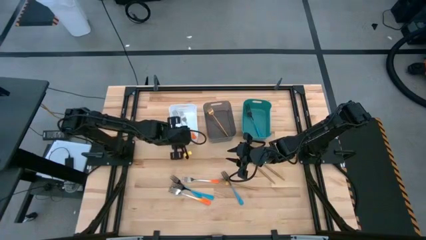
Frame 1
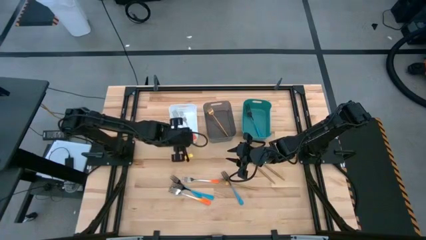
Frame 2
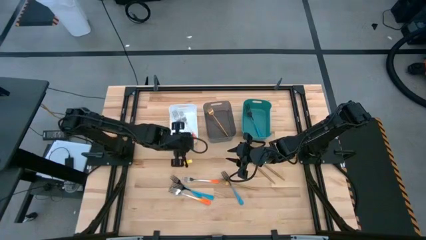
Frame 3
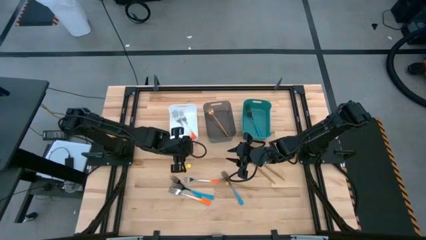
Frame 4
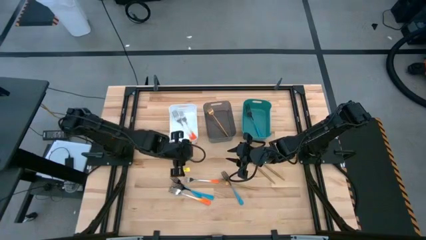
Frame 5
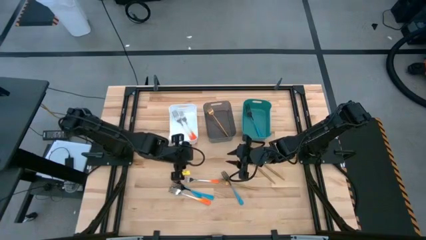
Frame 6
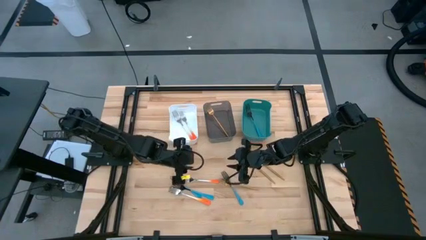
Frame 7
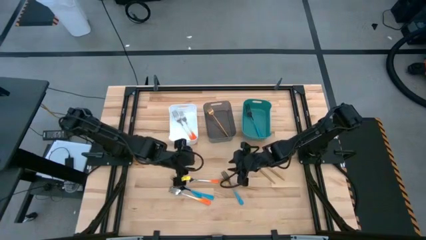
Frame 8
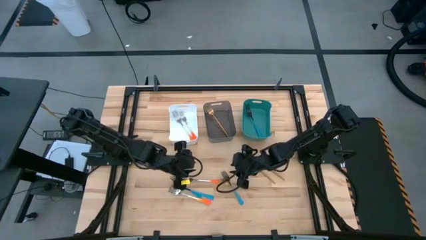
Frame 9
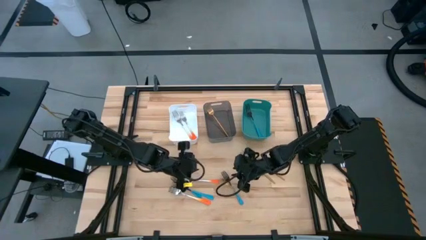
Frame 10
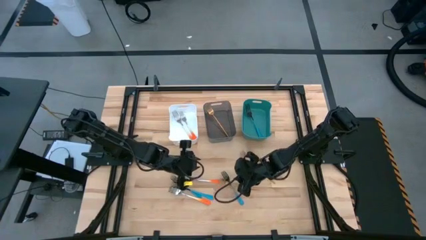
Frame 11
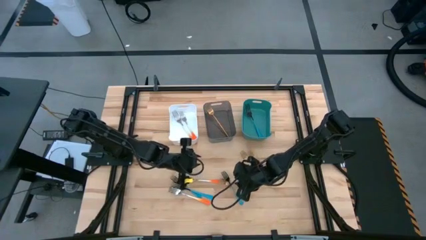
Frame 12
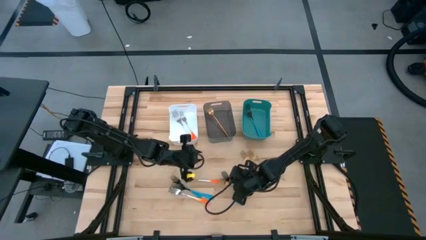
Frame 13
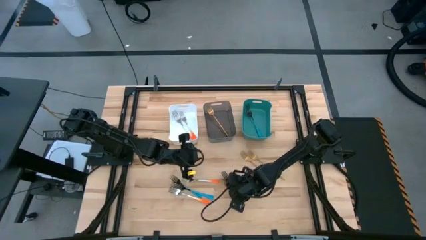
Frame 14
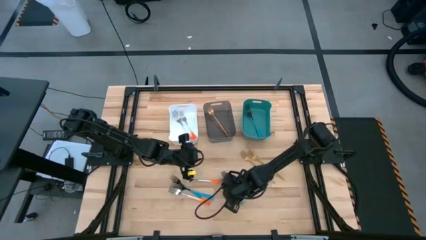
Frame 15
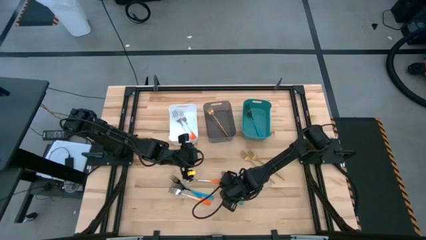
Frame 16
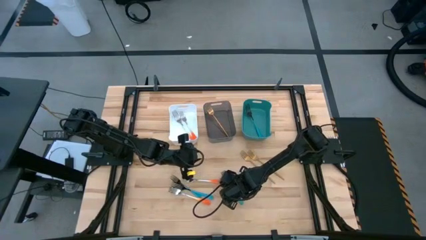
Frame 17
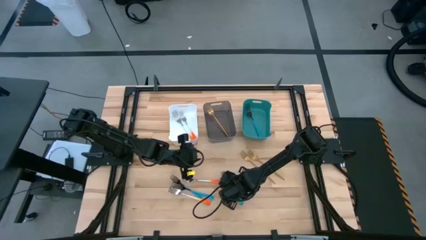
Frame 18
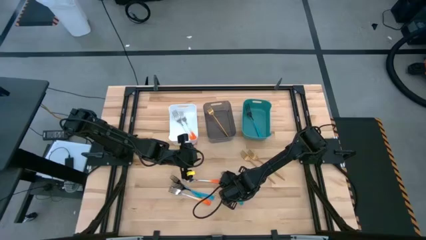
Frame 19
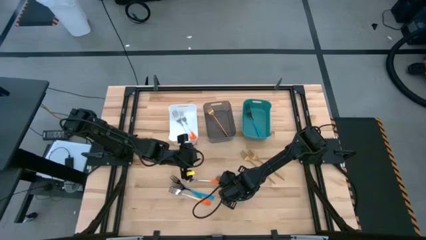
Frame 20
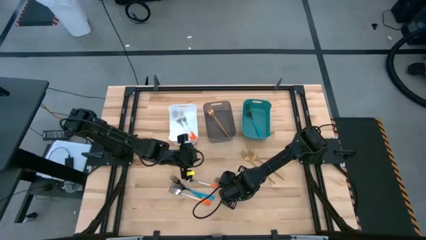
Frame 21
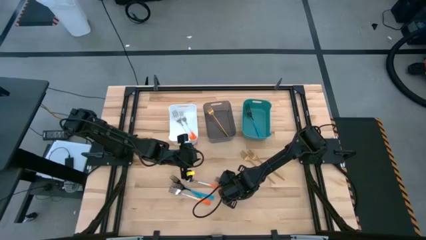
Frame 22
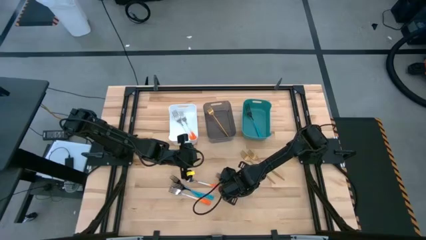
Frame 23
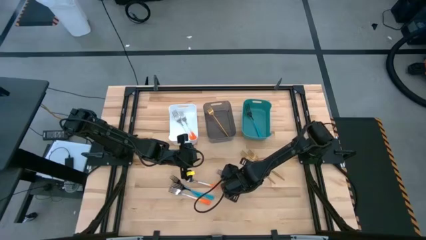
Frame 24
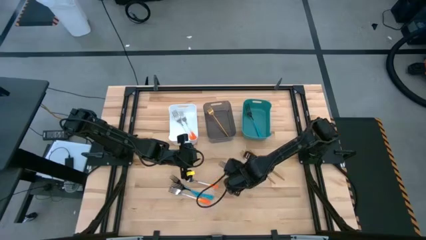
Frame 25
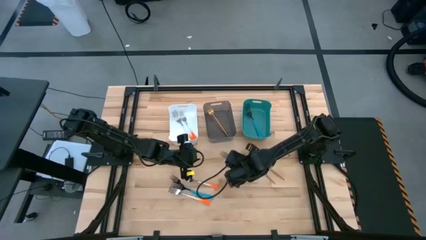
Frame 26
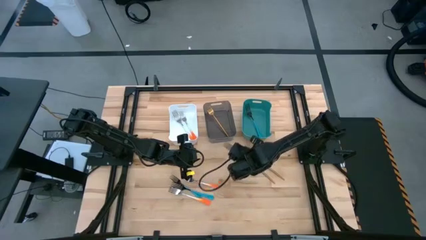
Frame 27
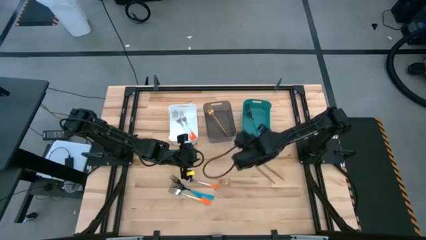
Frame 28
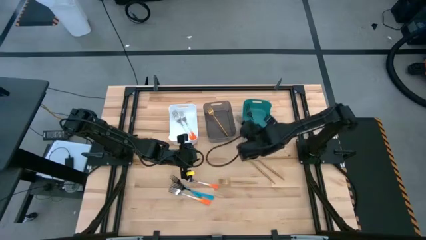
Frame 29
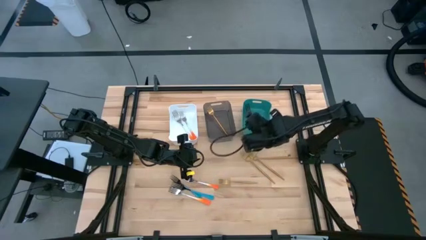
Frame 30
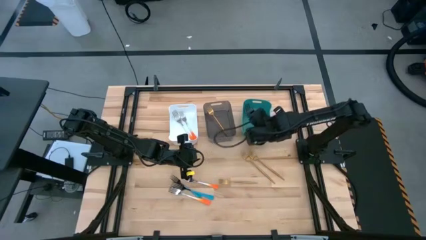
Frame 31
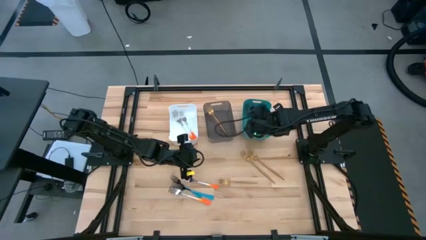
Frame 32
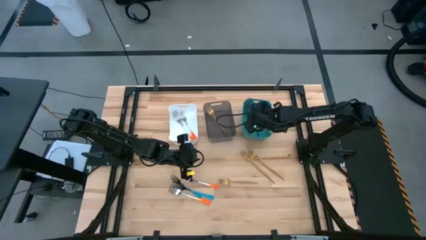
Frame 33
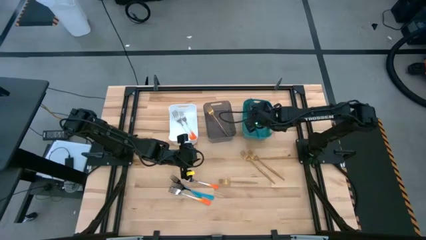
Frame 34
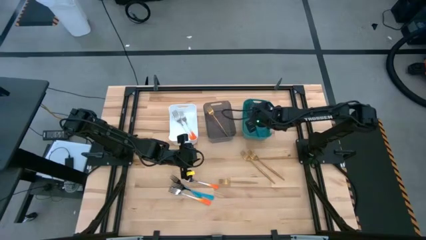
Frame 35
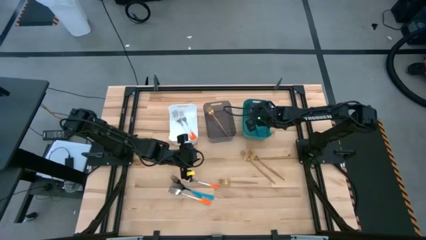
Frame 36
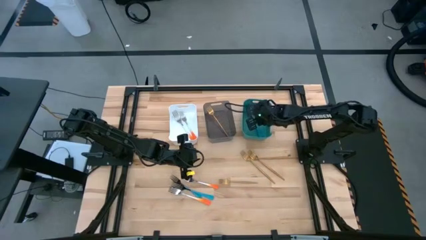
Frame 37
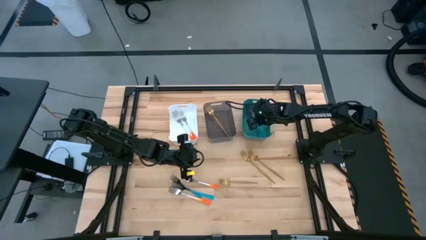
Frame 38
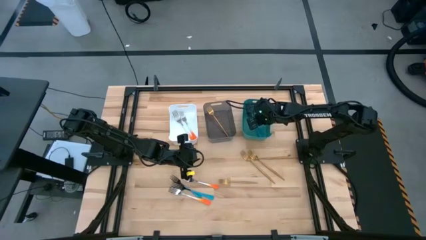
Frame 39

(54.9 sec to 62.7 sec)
Task: Sort silverware by color (type)
Put the blue fork into the green bin

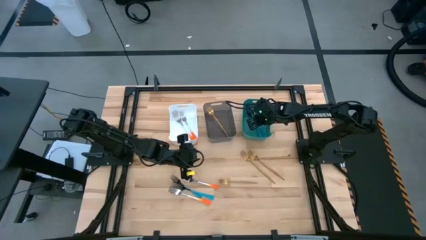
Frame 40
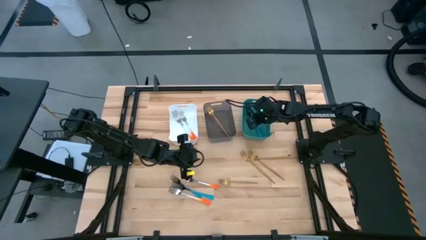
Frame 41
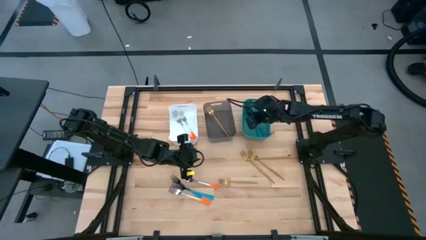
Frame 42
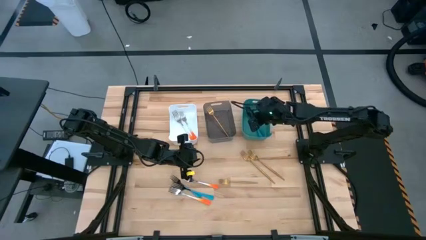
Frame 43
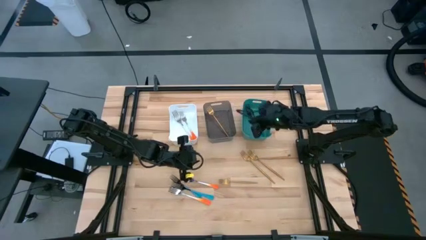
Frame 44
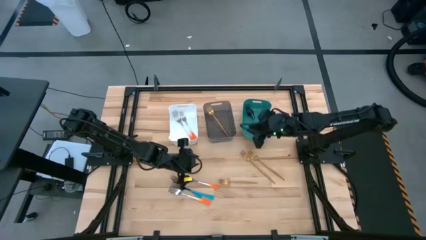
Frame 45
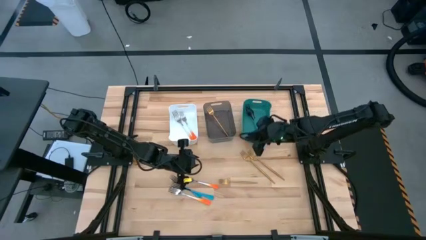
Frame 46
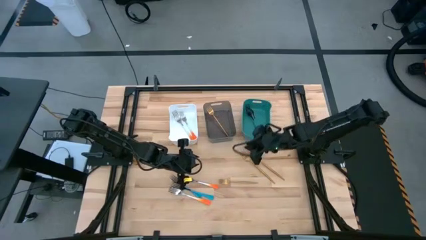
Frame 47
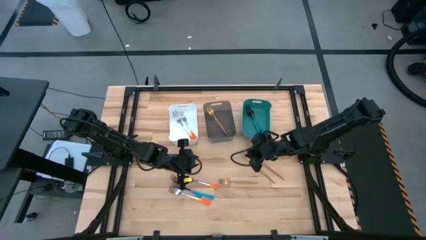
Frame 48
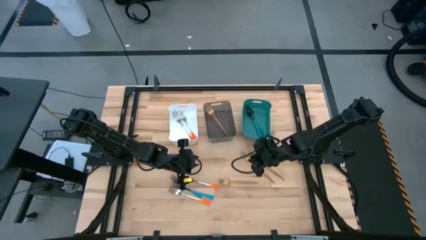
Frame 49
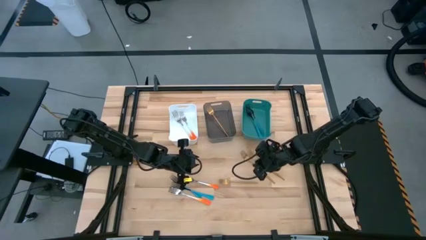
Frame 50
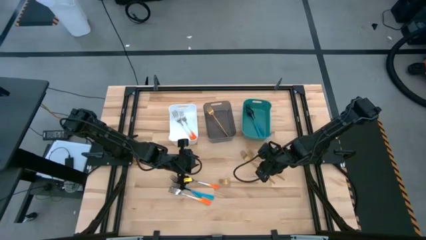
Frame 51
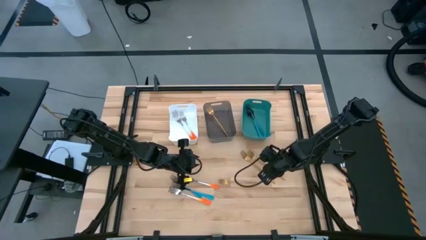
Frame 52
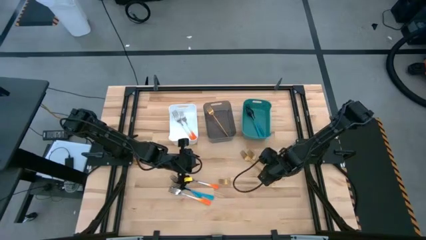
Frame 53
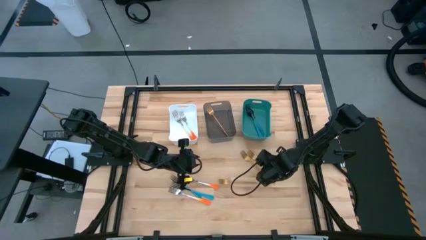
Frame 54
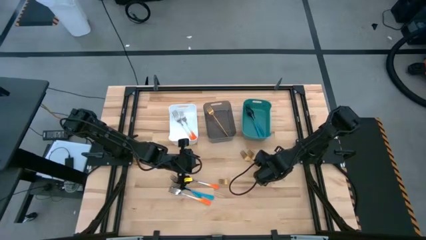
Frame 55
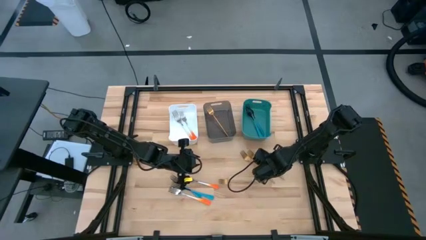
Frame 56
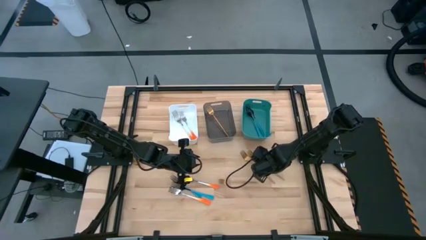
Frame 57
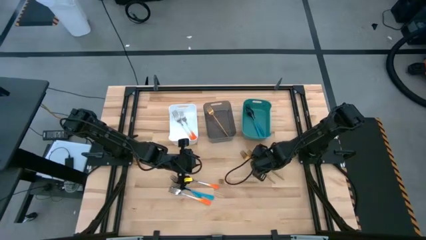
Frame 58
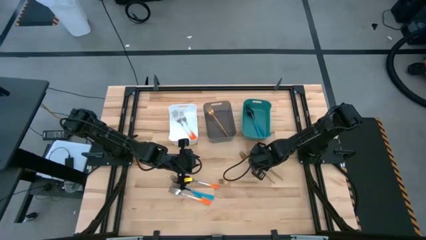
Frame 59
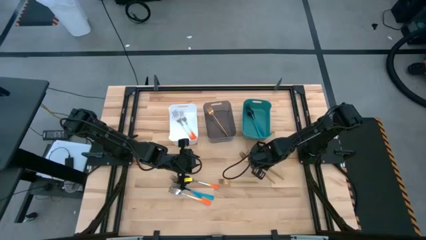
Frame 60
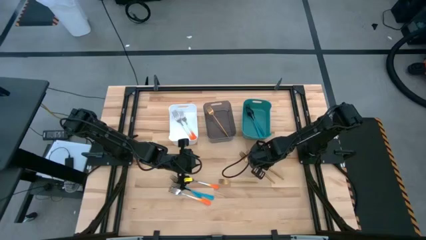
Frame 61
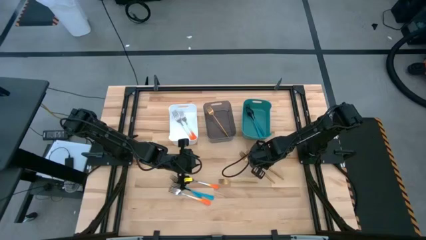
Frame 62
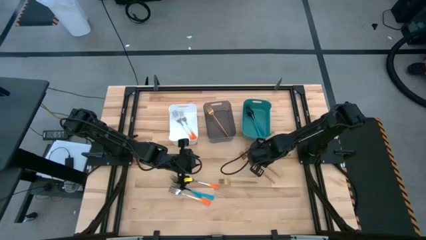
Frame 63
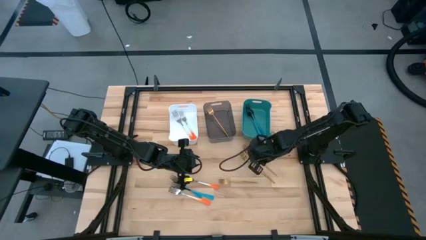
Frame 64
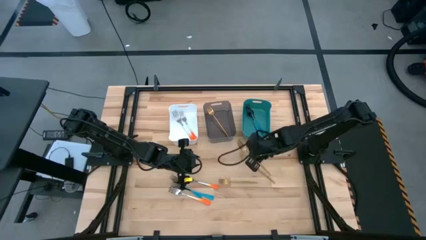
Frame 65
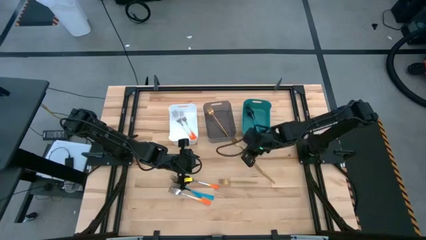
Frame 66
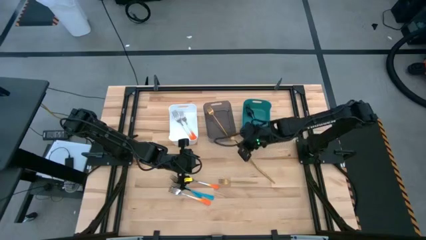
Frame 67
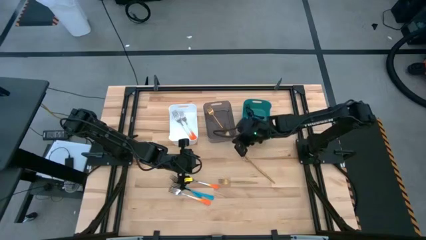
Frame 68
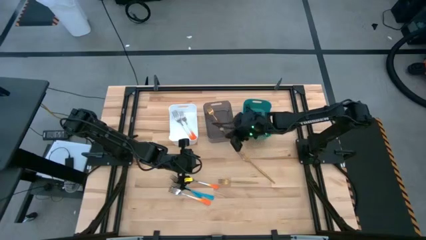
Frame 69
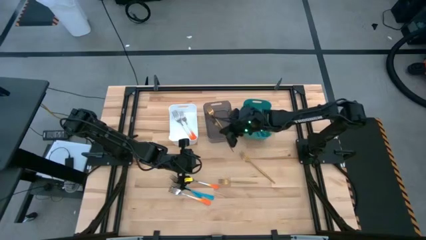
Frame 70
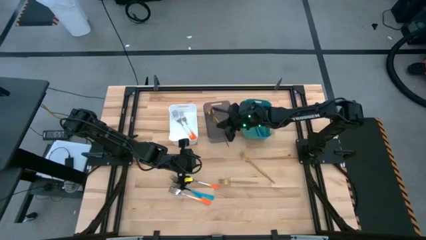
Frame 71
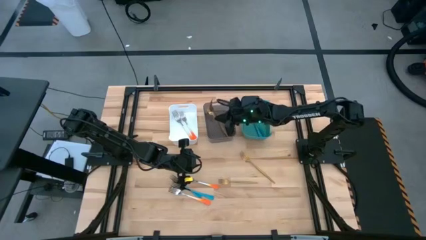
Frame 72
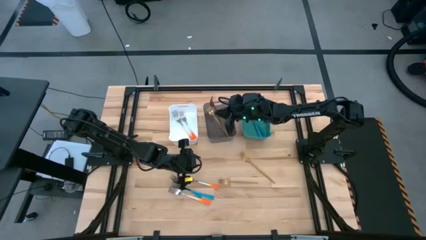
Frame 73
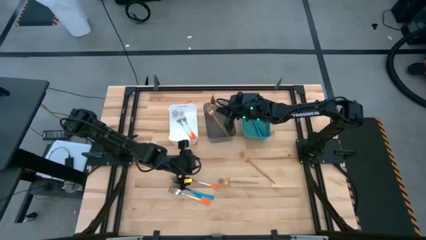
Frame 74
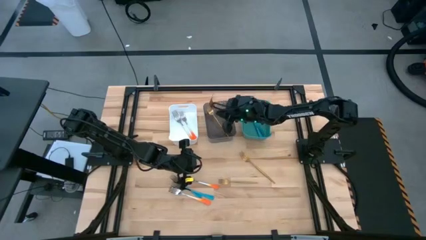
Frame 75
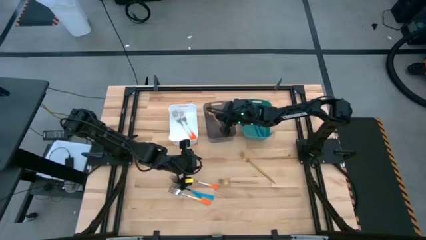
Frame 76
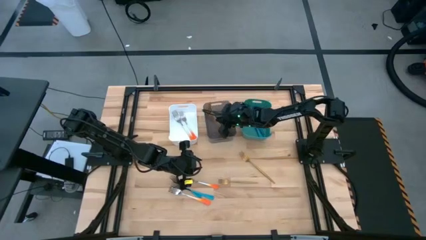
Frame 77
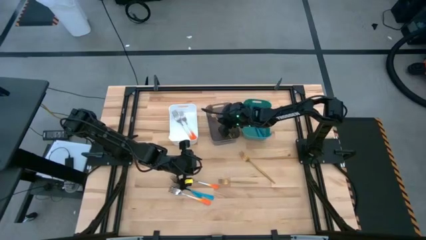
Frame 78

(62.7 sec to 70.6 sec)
Put the gold fork into the black bin
